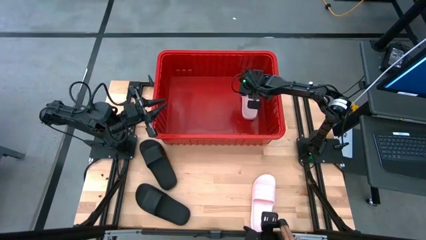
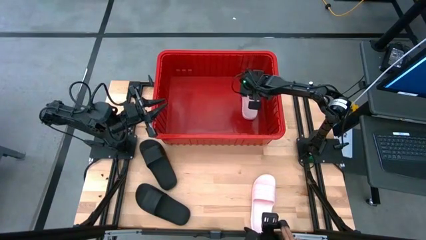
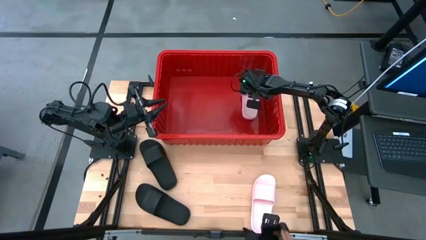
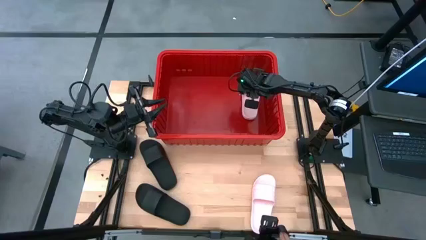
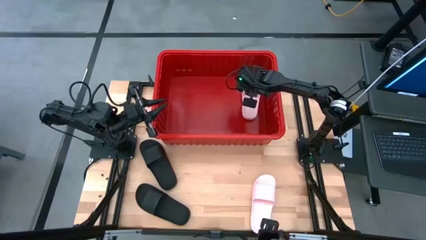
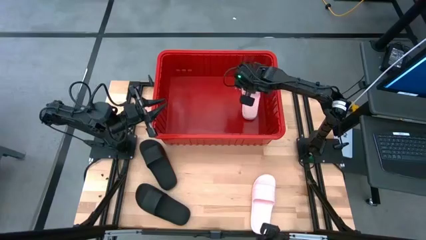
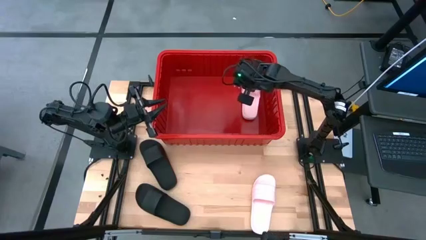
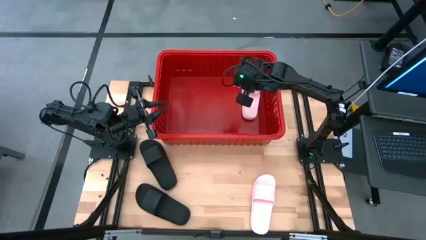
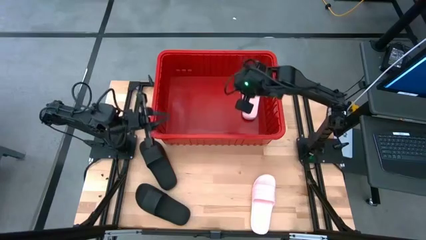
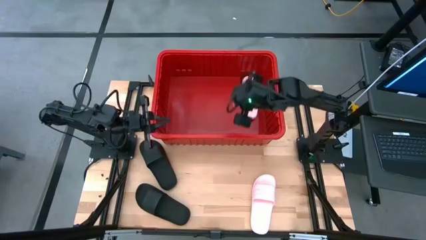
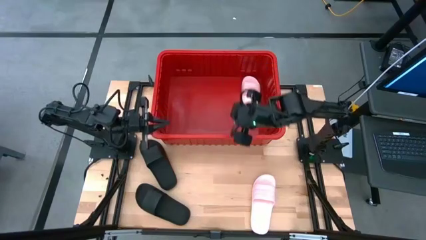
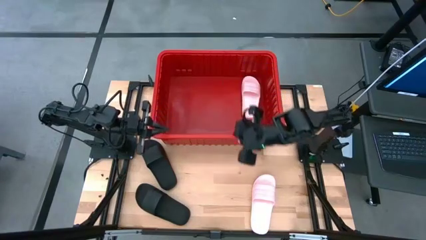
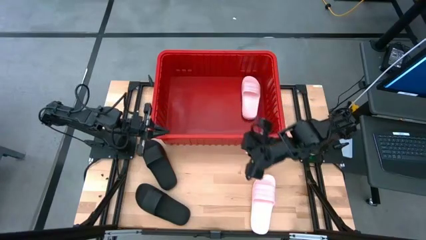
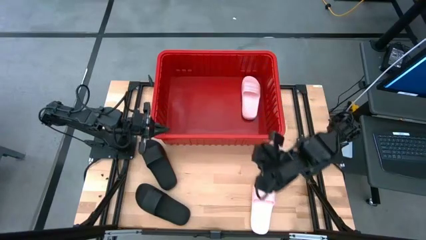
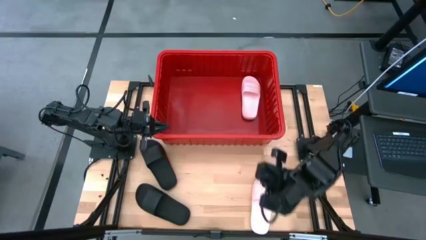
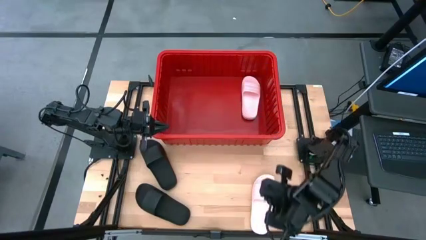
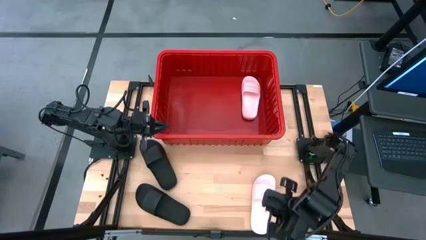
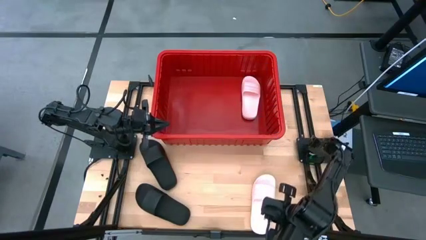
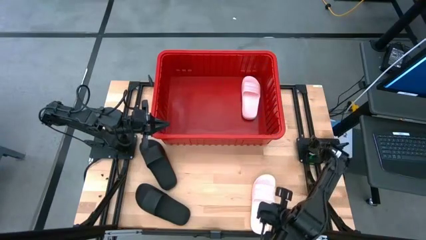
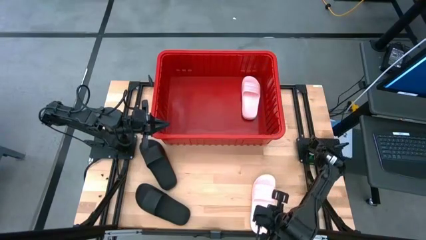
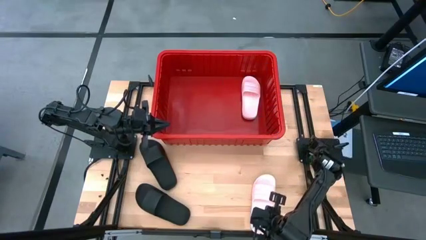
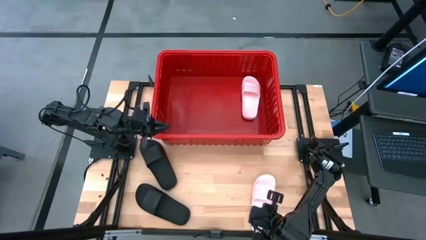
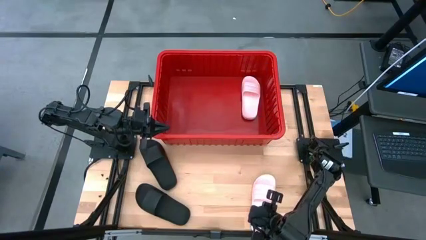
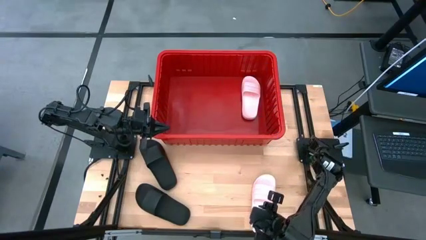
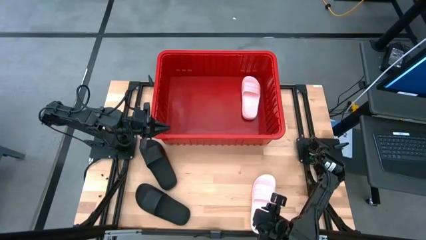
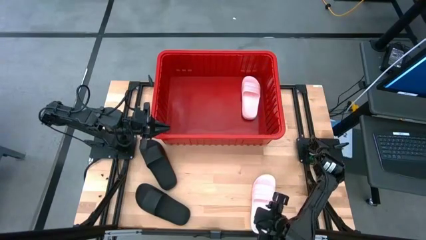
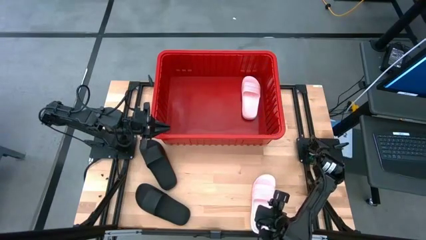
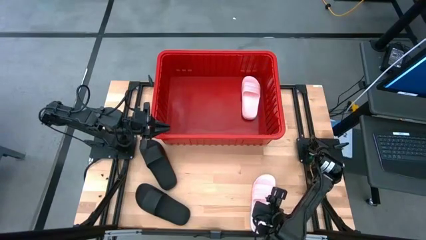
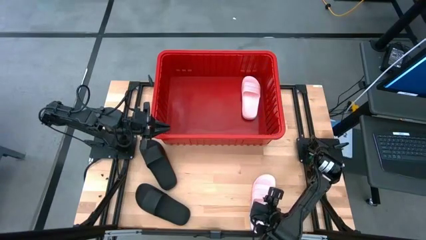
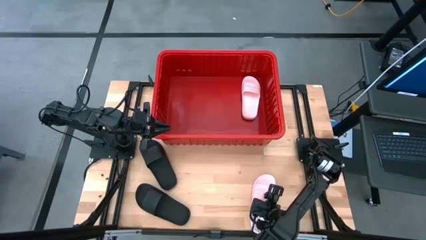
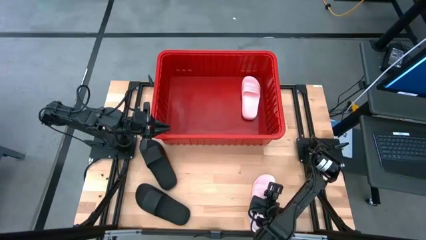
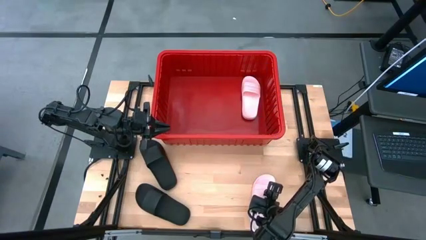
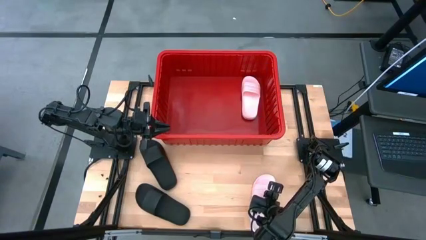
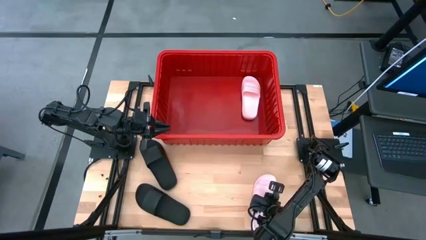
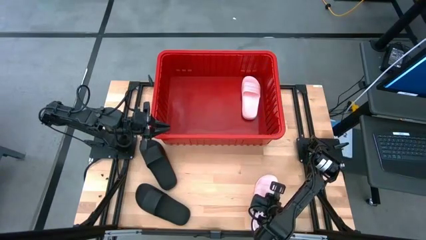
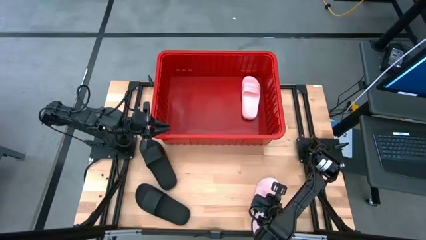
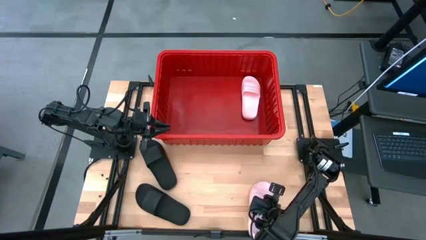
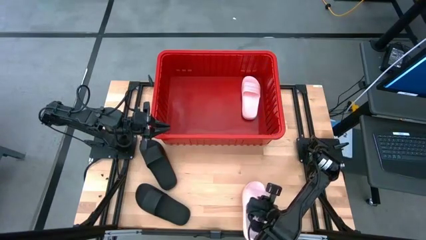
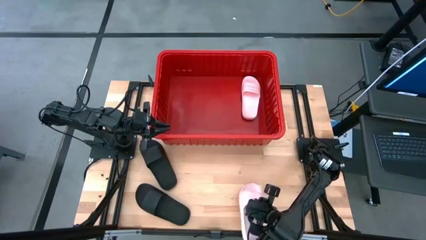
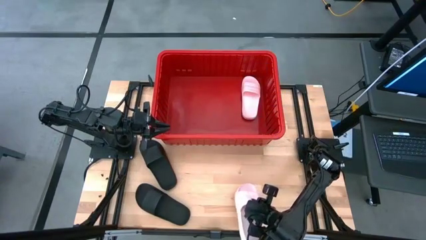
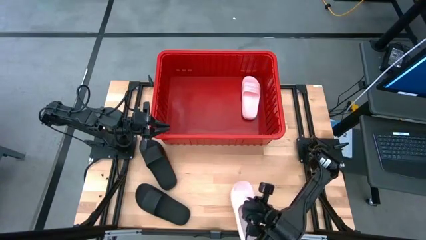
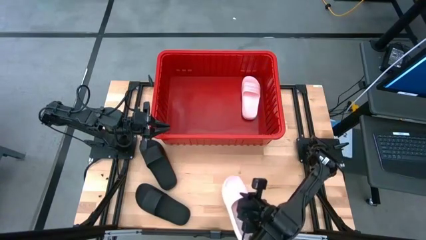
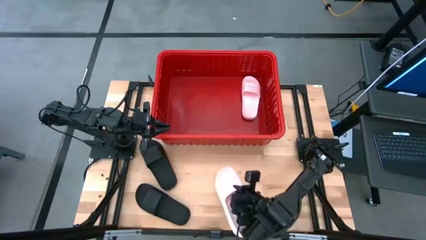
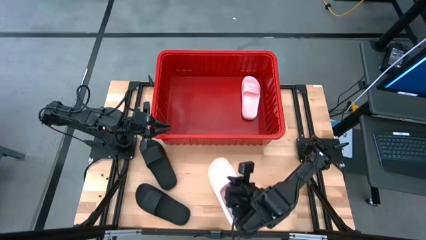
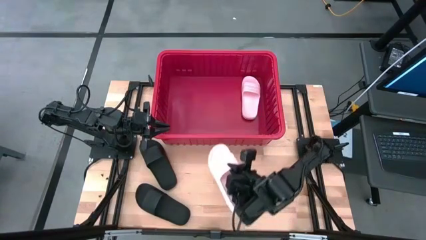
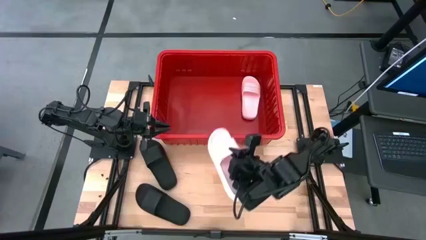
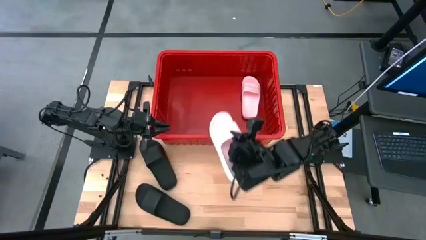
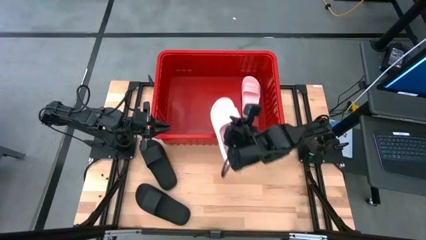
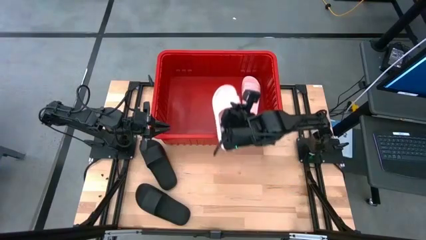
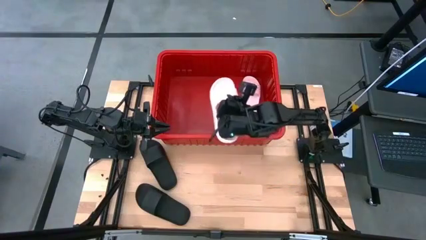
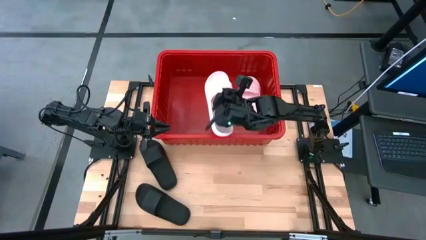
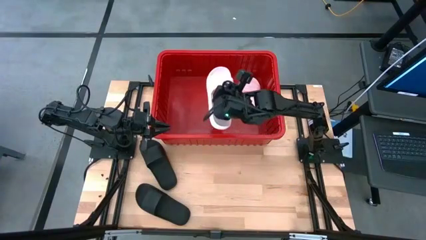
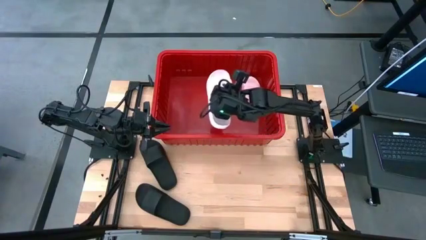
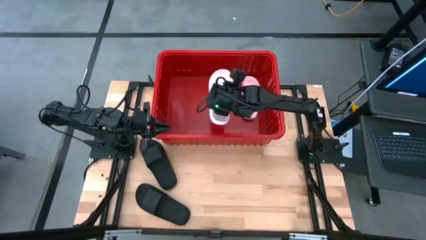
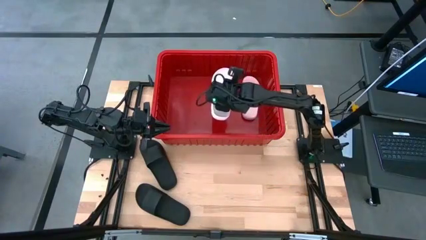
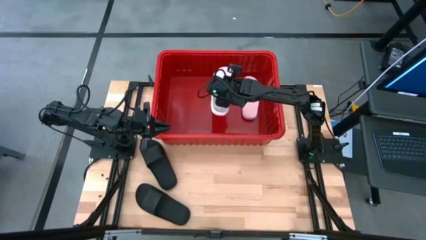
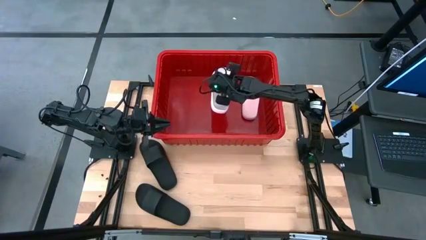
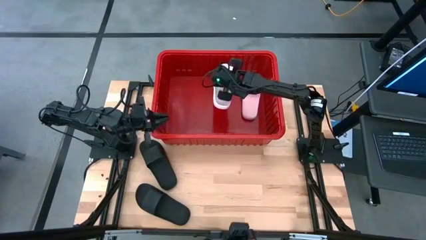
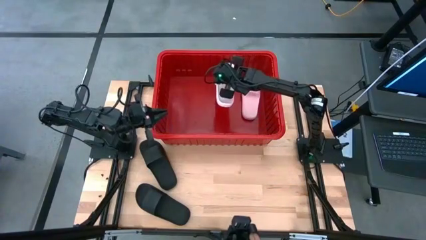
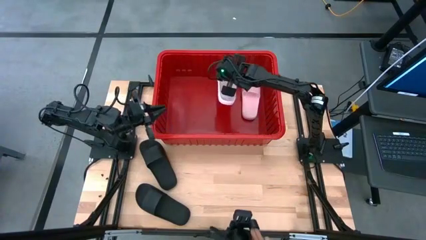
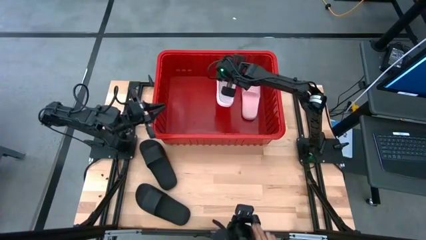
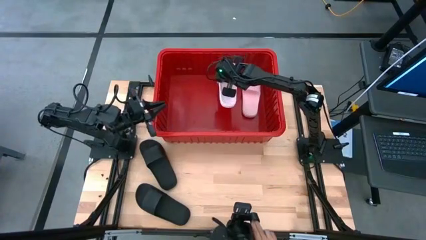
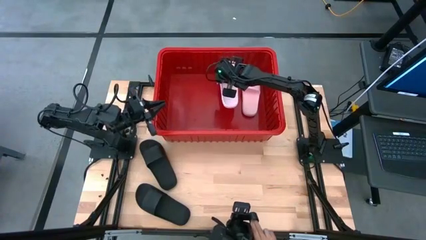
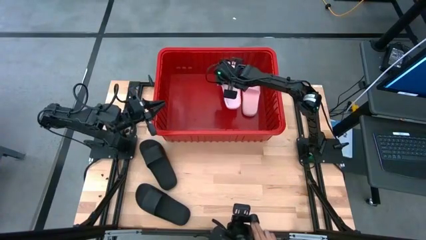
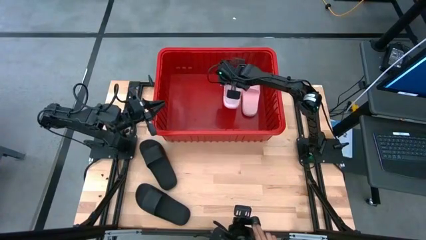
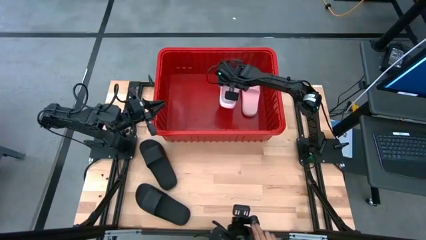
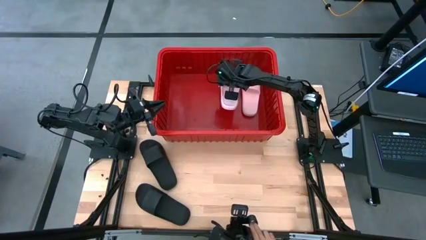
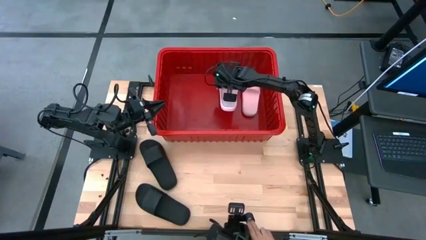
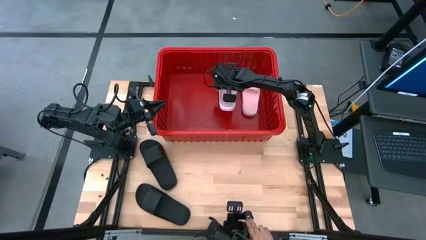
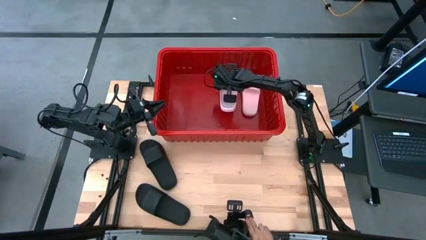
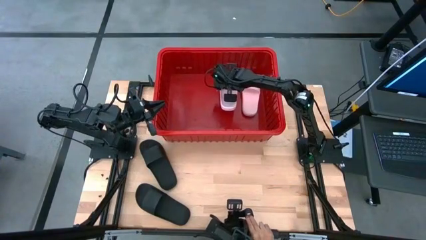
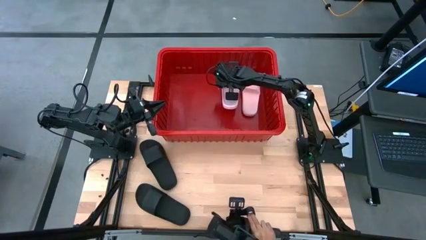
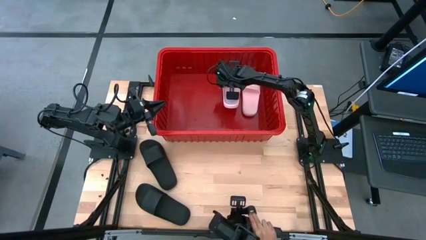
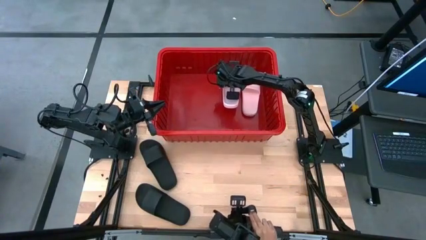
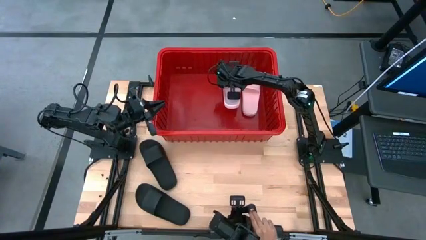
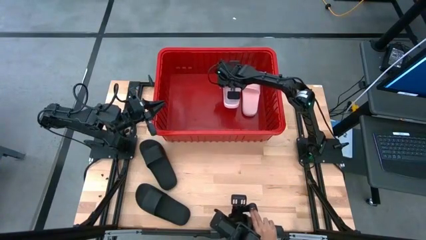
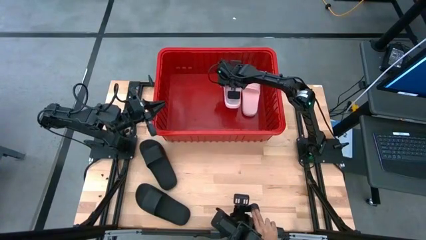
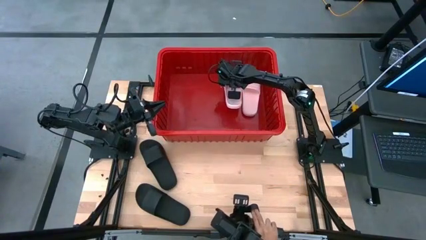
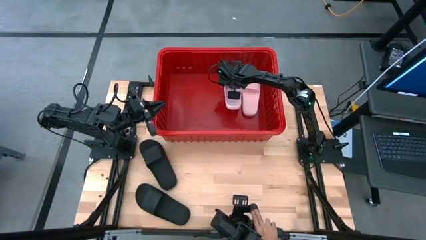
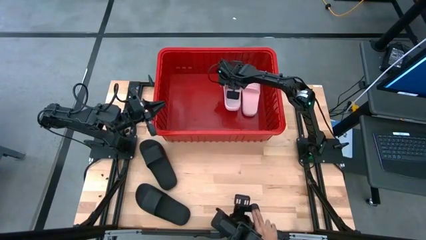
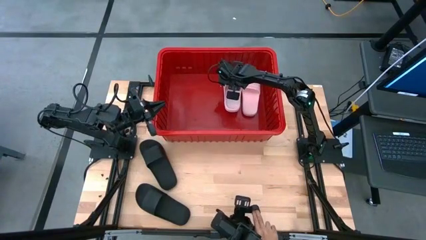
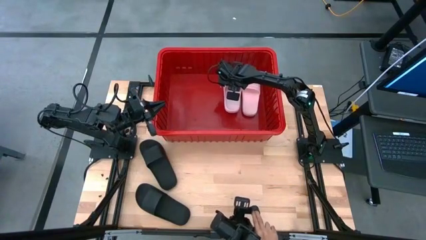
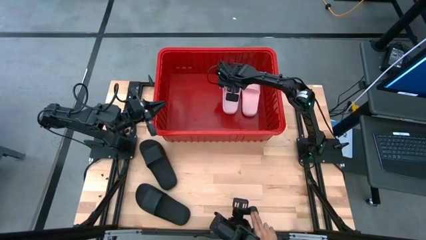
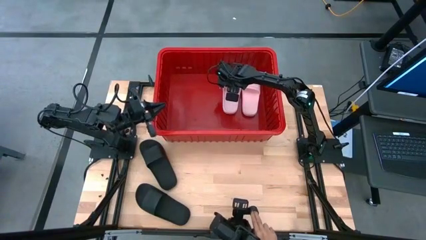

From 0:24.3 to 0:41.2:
Task: Pick and place slides into bin
Put the pink slide into the red bin

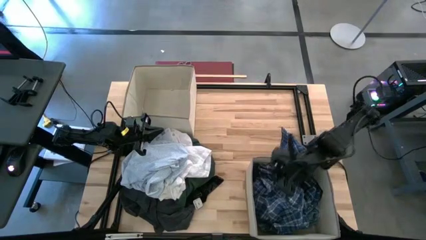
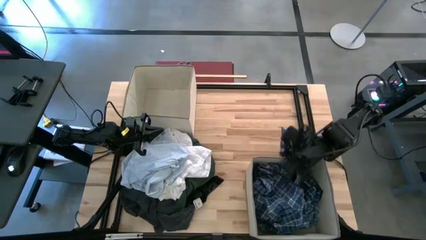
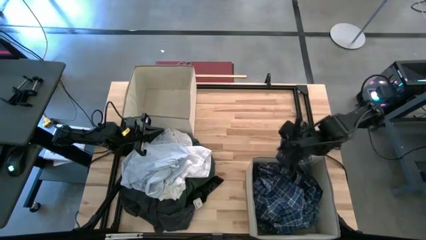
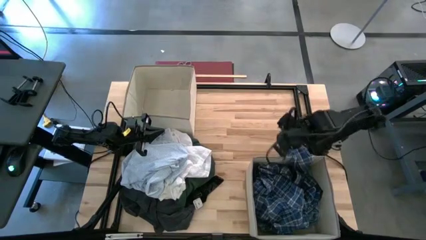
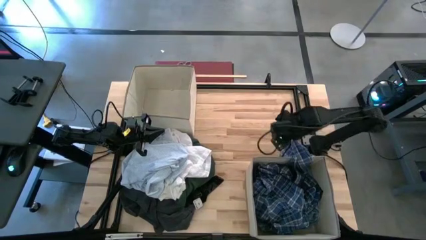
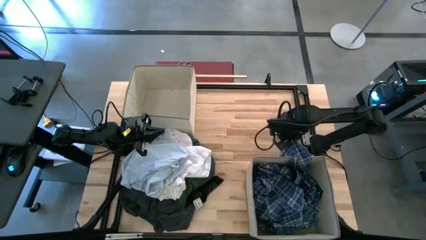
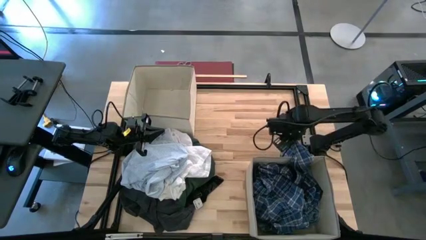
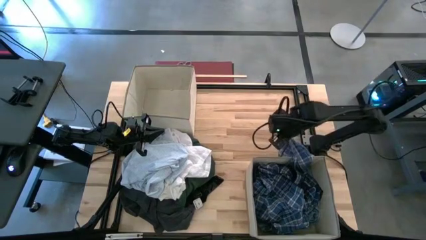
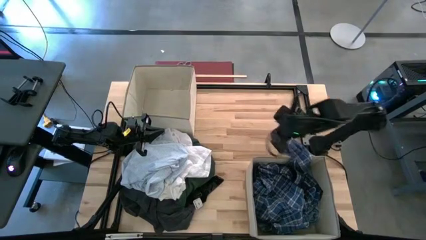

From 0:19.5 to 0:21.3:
Task: Sort clothes
Put the blue polo shirt into the bottom laundry bin
